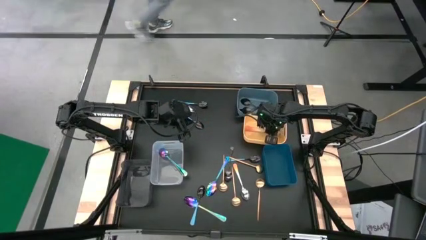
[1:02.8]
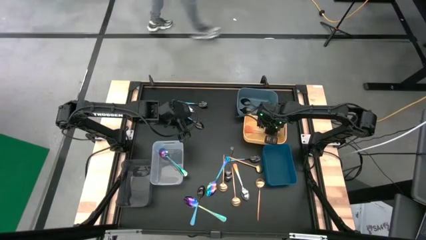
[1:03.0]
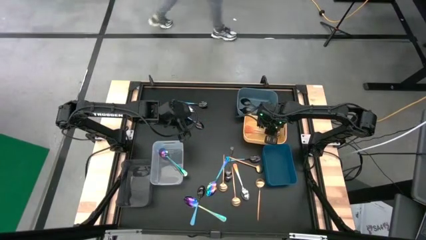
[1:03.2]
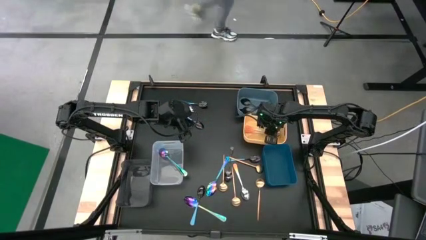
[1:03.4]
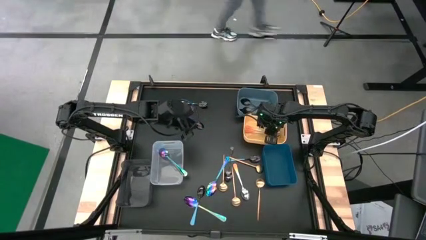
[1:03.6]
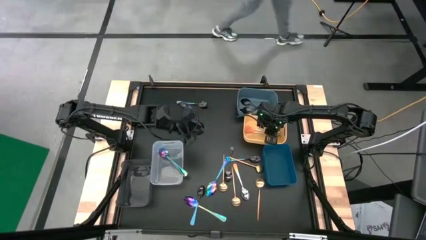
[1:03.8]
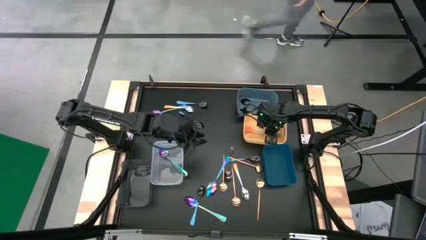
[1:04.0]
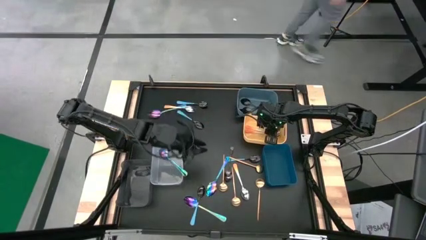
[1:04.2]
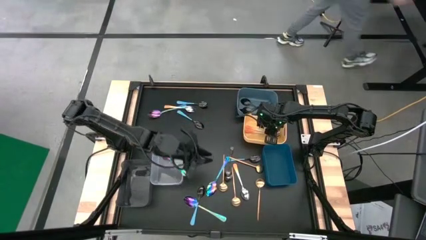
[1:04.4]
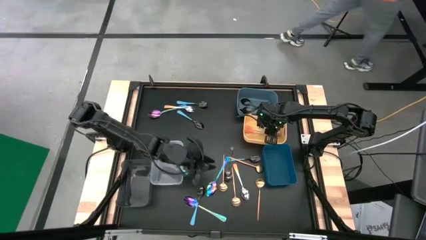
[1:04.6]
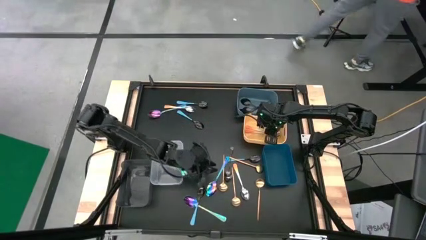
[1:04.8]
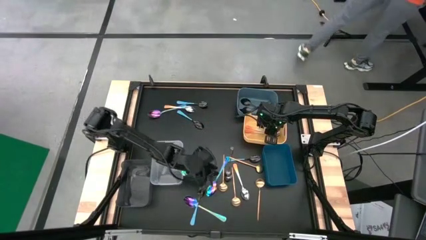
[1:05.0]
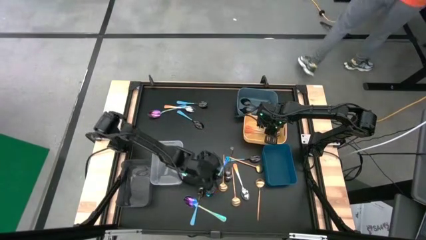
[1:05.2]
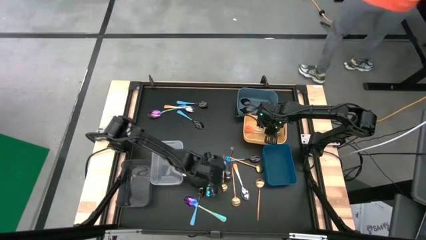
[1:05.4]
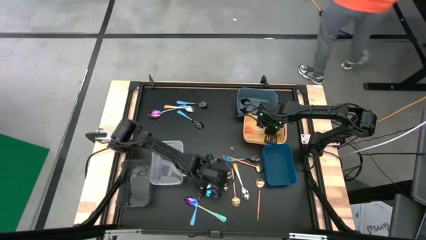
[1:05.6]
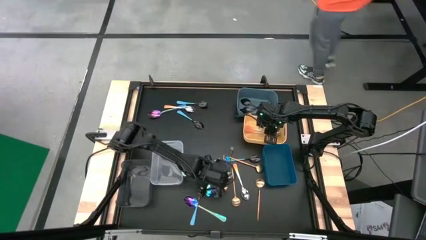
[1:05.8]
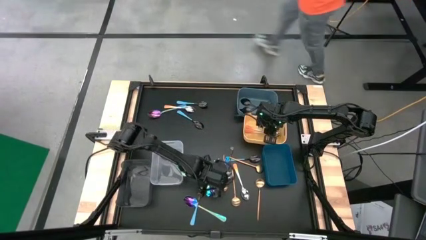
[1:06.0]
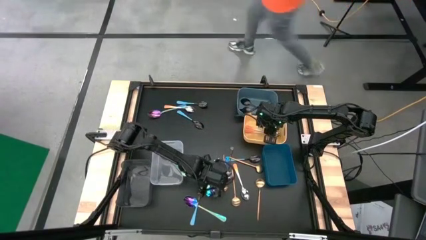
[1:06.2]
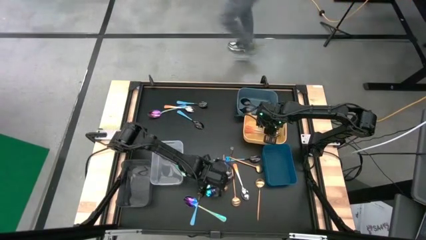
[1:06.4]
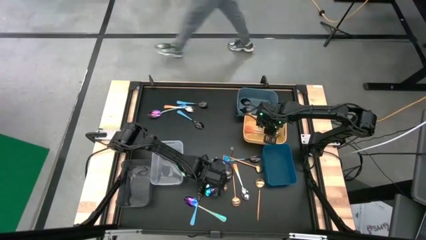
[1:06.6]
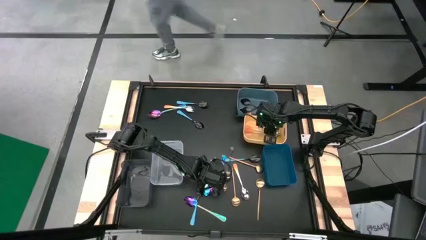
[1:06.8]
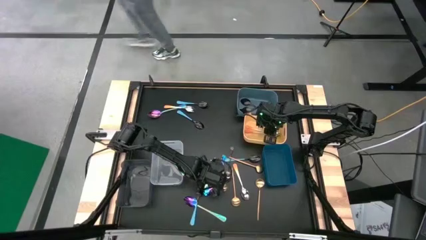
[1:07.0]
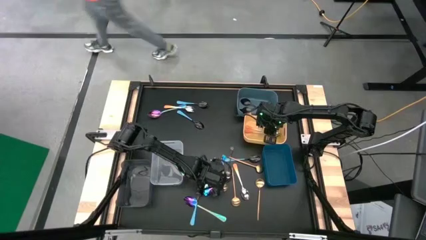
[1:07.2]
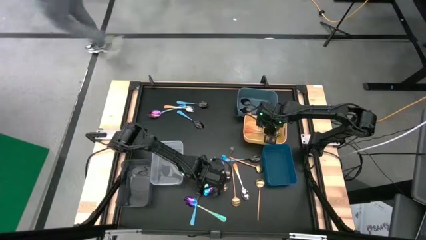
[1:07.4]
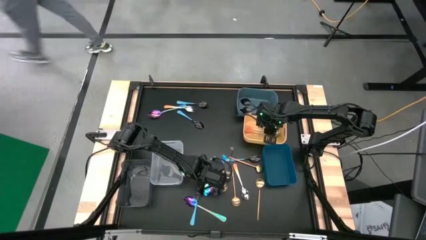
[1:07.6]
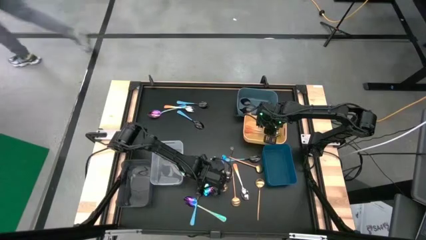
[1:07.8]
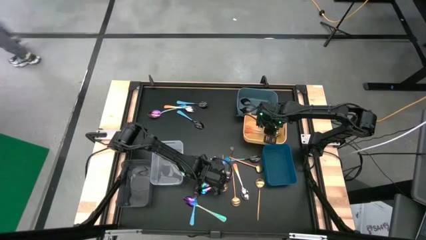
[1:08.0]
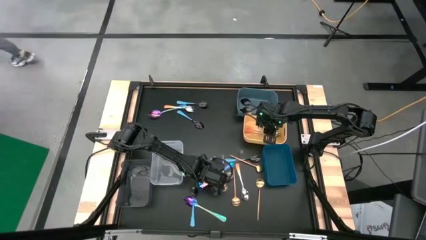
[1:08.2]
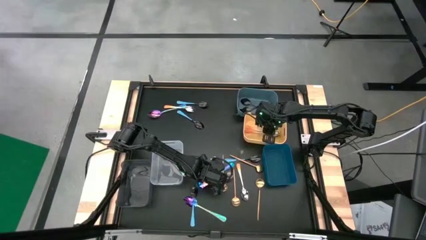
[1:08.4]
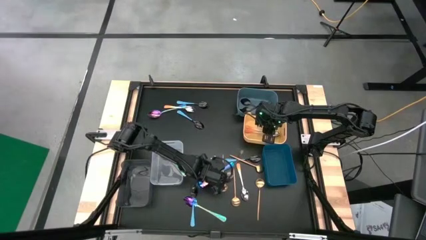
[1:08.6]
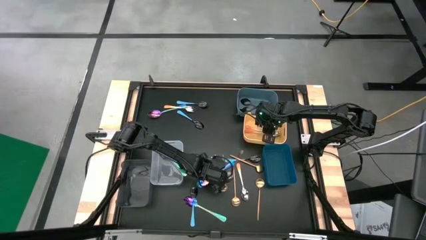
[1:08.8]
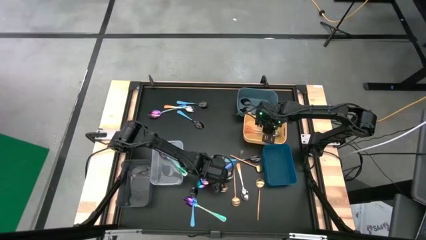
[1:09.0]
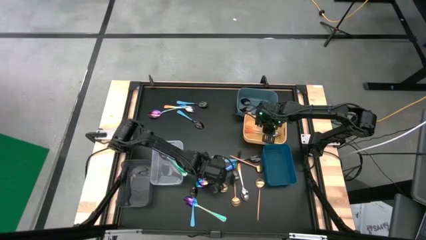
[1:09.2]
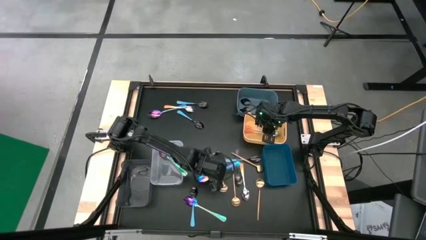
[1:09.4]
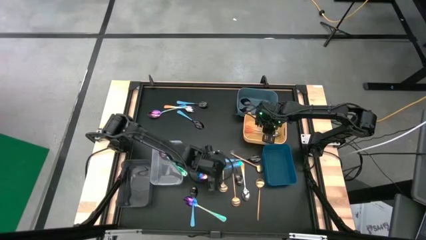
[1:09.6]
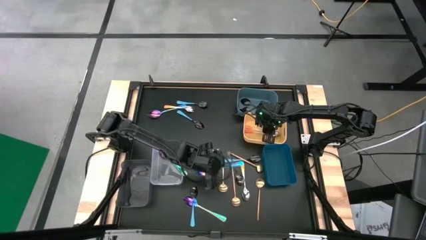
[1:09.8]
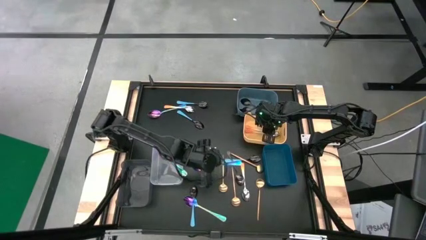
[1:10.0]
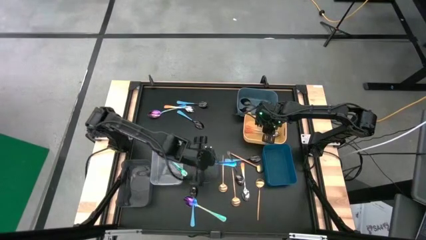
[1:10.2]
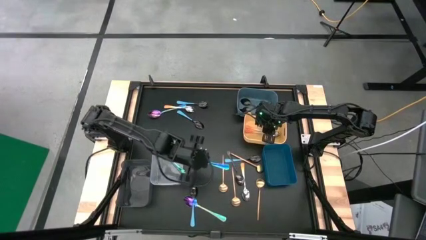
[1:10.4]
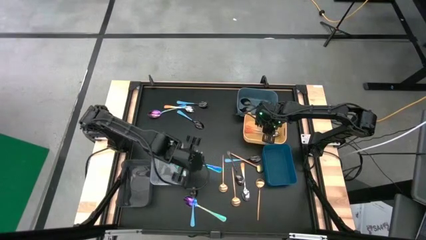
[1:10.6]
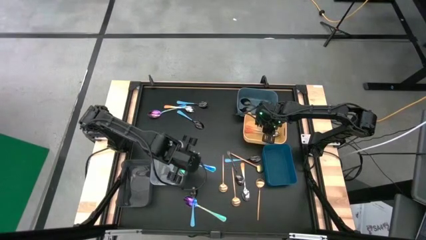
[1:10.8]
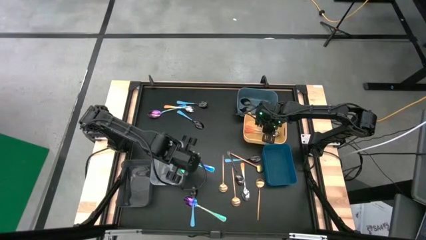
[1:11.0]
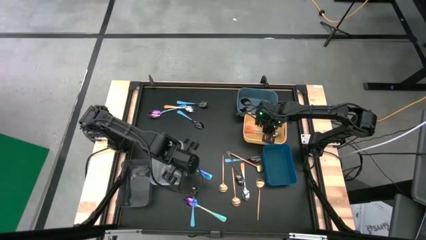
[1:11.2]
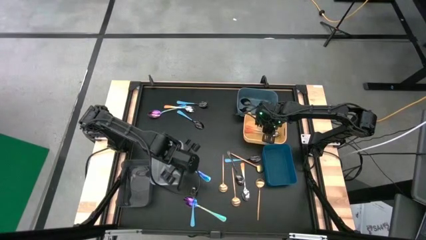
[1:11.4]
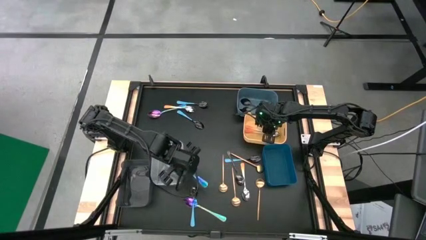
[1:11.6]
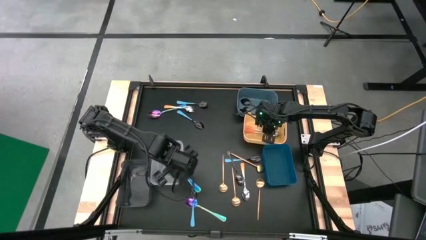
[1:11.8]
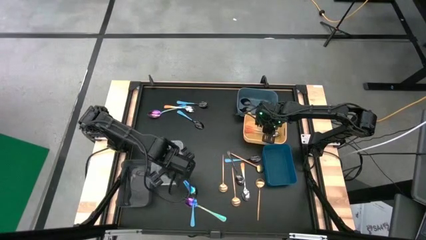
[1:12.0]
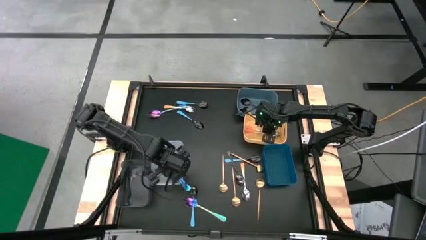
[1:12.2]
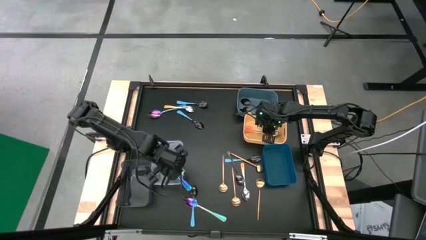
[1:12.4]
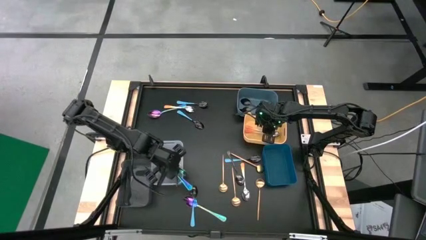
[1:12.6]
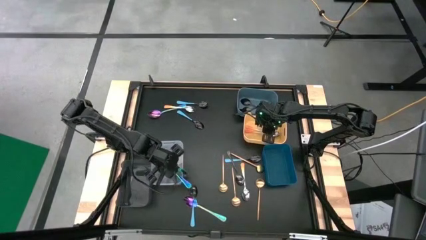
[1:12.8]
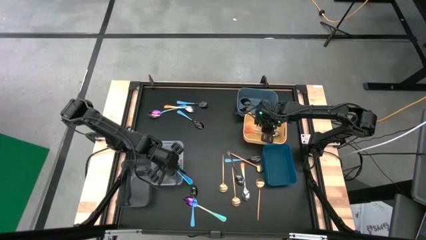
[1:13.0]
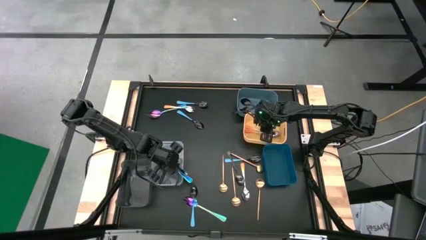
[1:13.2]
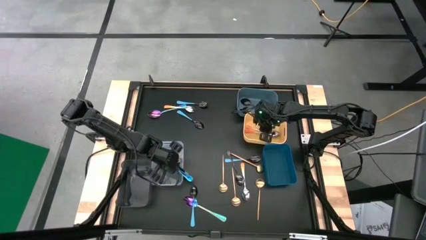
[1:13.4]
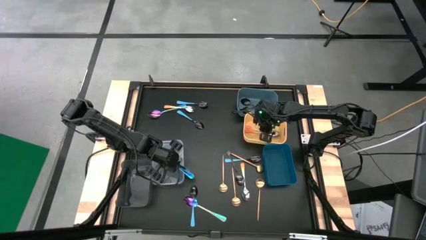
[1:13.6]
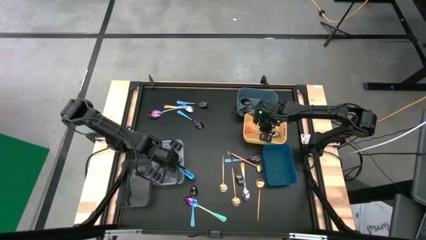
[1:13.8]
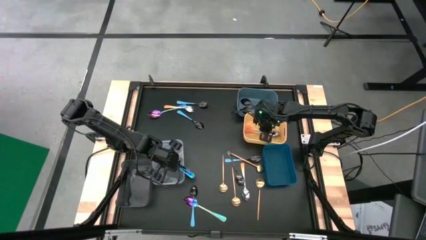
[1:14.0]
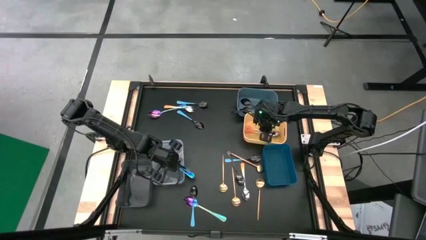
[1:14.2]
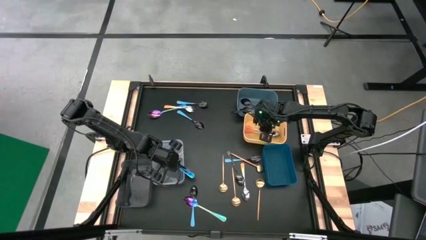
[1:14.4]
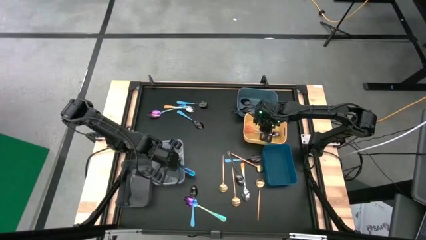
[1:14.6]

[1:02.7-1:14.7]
Task: Sort silverware by color (type)
Put the purple spoon into the transparent bin
